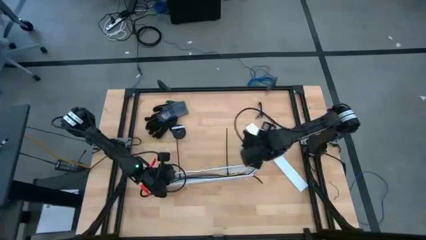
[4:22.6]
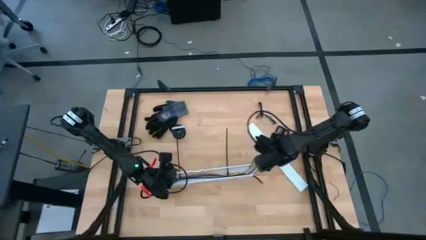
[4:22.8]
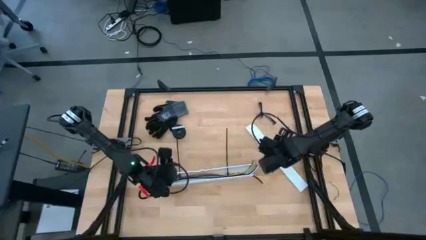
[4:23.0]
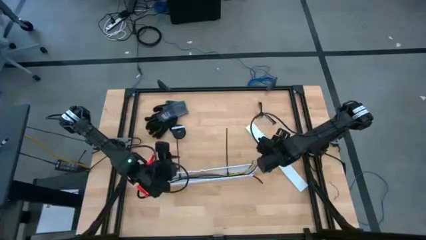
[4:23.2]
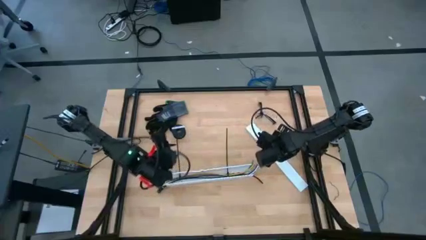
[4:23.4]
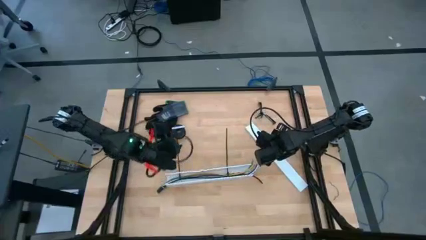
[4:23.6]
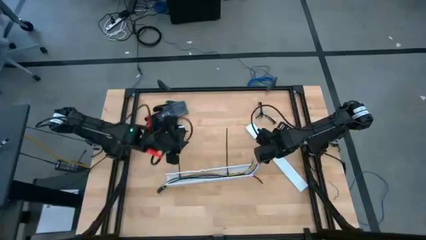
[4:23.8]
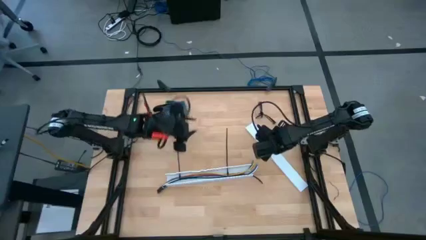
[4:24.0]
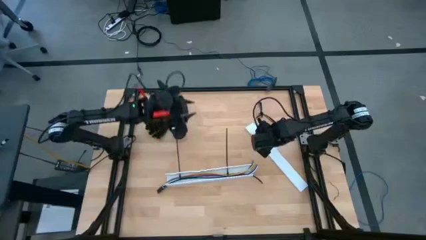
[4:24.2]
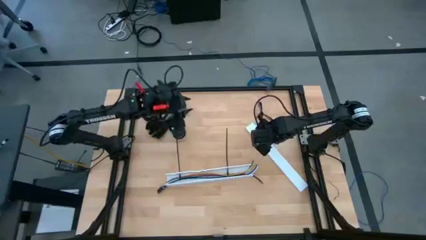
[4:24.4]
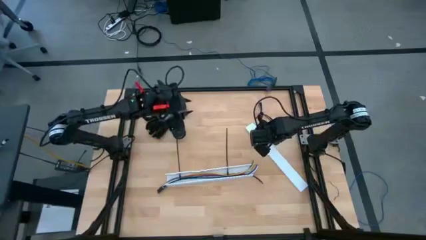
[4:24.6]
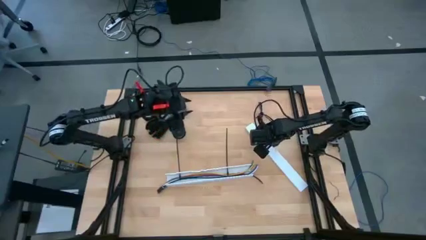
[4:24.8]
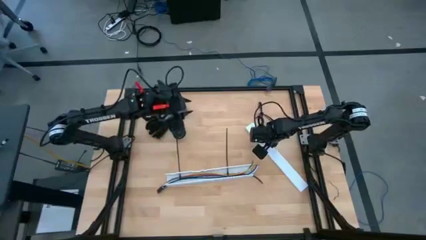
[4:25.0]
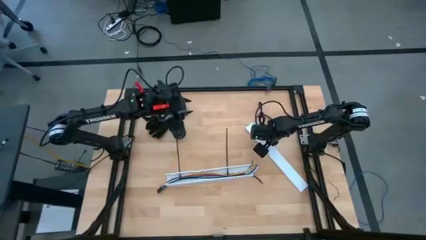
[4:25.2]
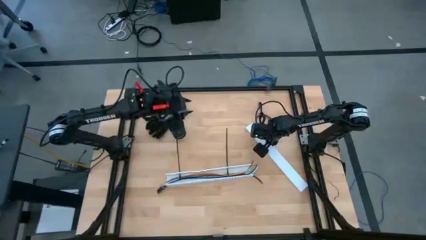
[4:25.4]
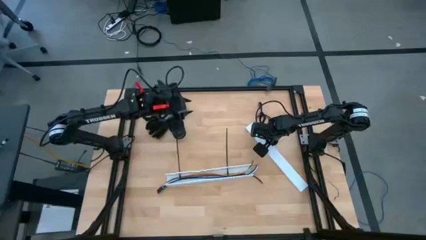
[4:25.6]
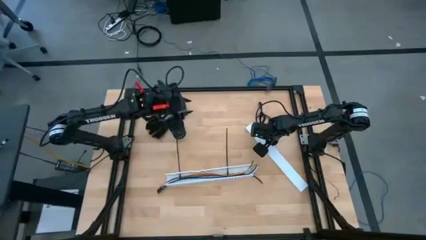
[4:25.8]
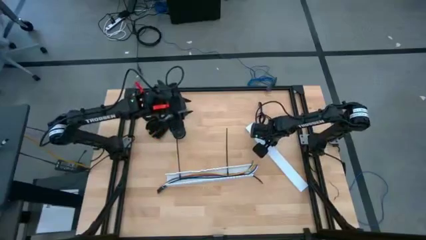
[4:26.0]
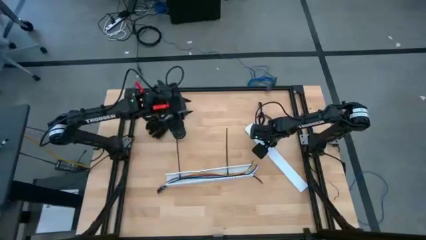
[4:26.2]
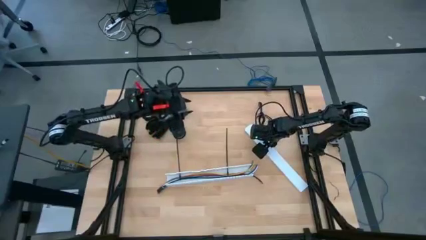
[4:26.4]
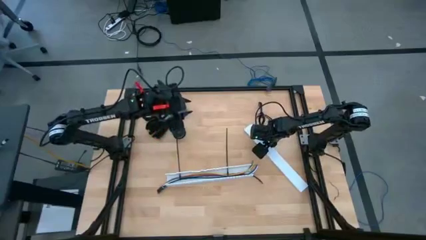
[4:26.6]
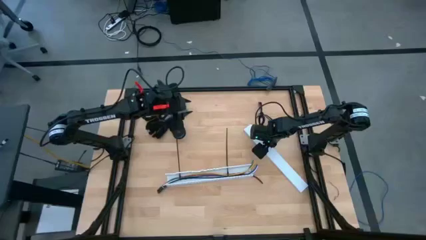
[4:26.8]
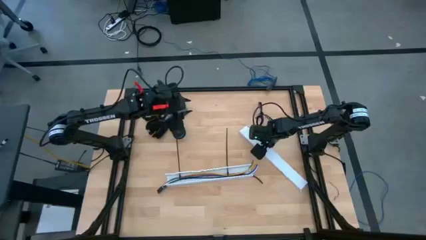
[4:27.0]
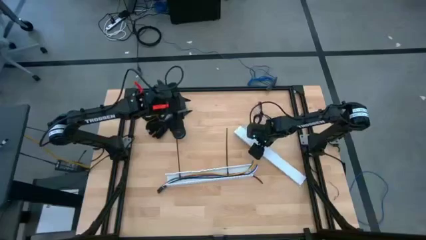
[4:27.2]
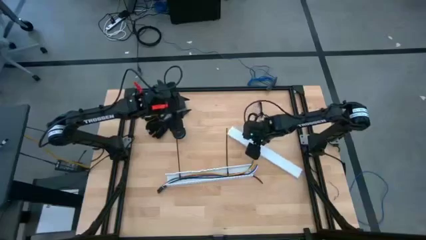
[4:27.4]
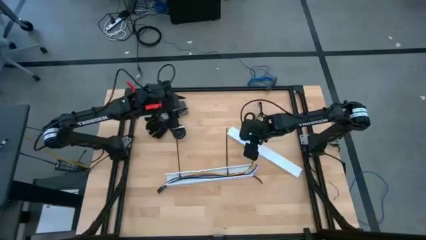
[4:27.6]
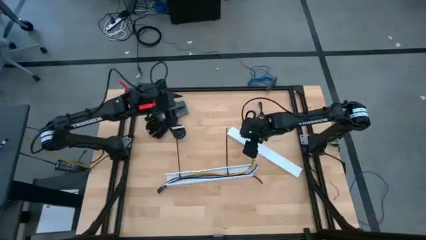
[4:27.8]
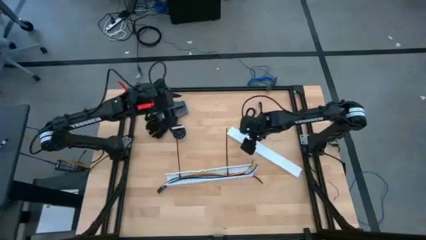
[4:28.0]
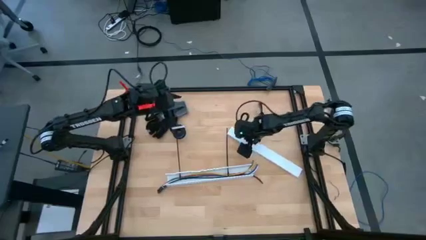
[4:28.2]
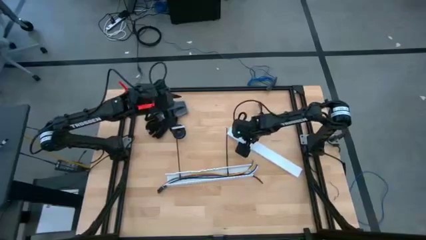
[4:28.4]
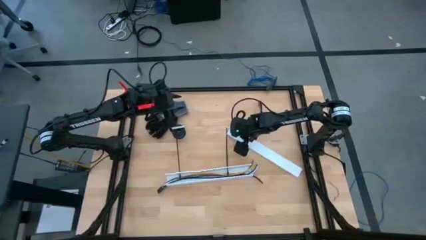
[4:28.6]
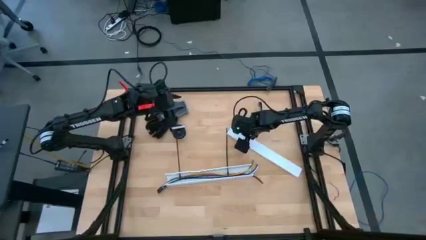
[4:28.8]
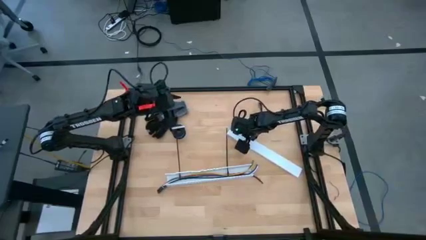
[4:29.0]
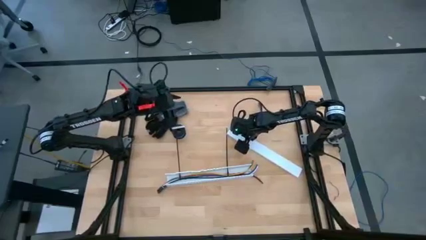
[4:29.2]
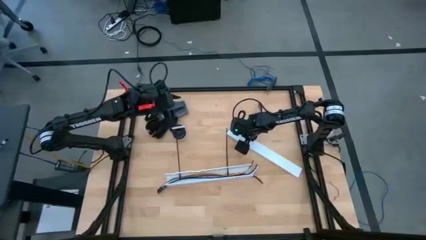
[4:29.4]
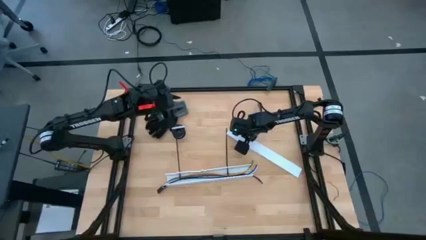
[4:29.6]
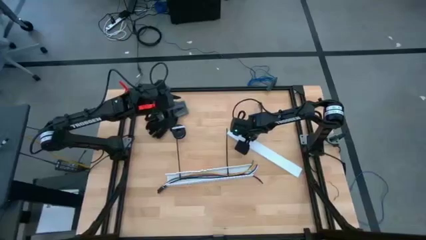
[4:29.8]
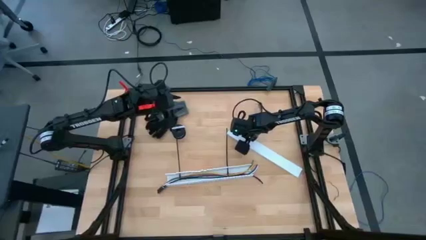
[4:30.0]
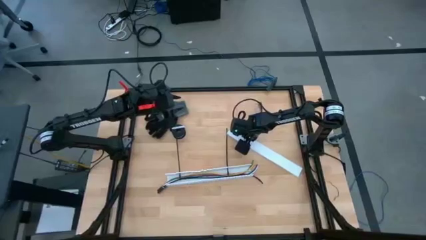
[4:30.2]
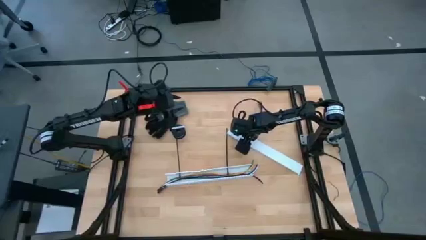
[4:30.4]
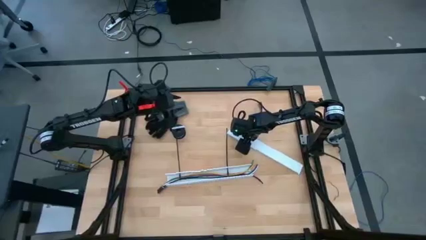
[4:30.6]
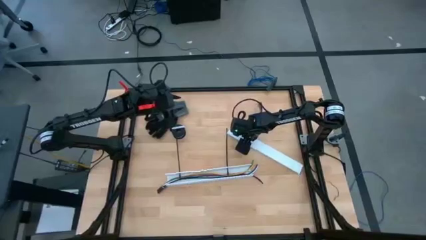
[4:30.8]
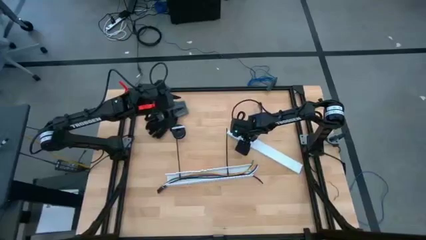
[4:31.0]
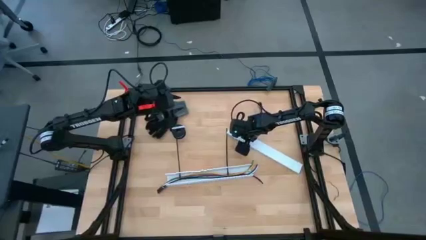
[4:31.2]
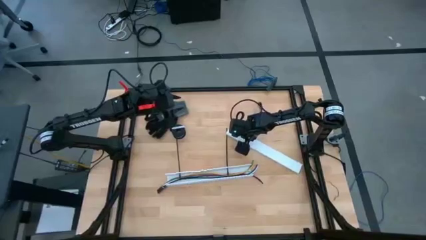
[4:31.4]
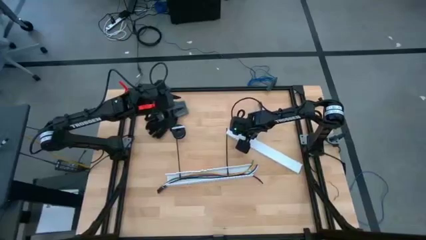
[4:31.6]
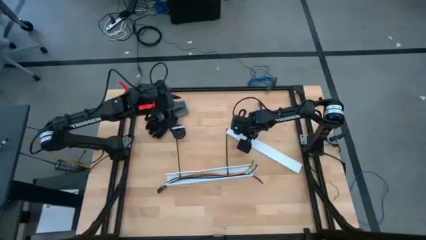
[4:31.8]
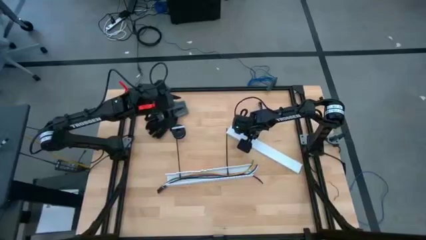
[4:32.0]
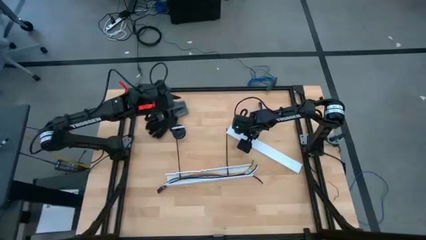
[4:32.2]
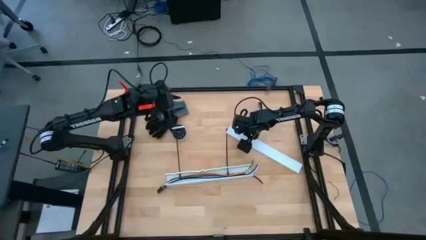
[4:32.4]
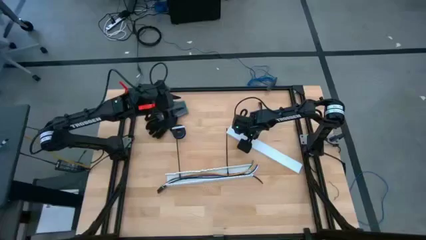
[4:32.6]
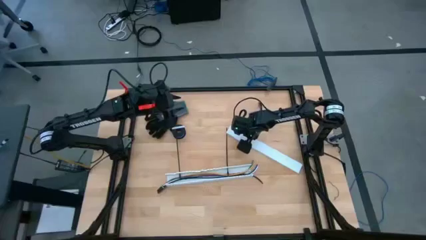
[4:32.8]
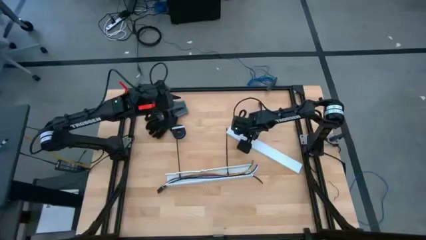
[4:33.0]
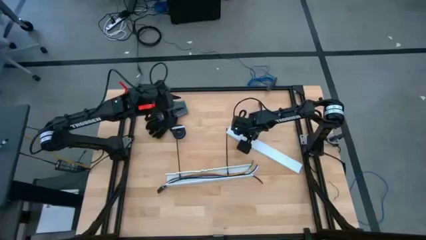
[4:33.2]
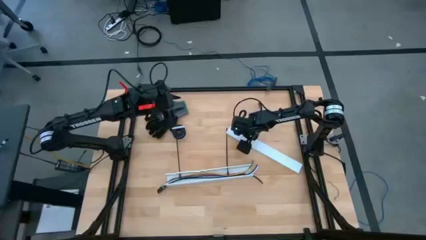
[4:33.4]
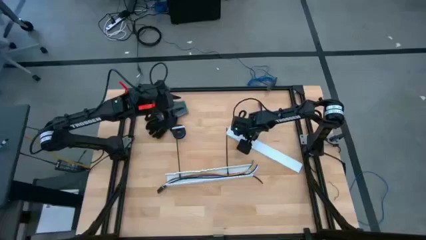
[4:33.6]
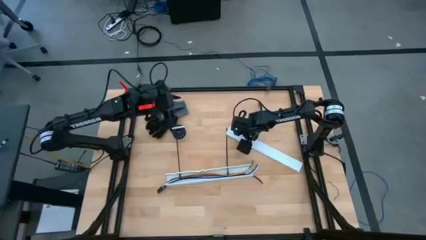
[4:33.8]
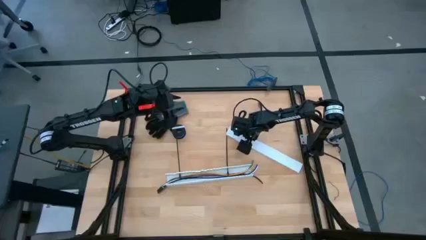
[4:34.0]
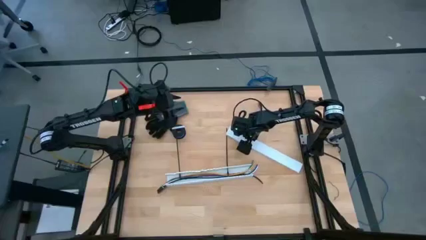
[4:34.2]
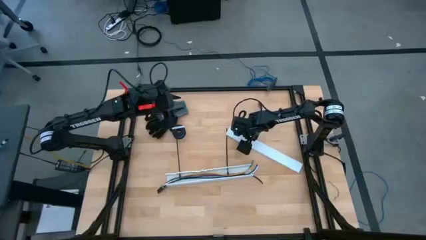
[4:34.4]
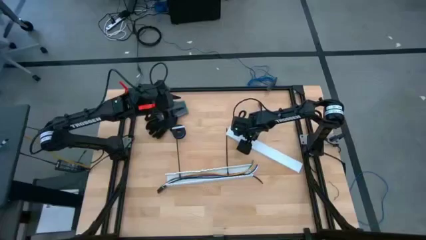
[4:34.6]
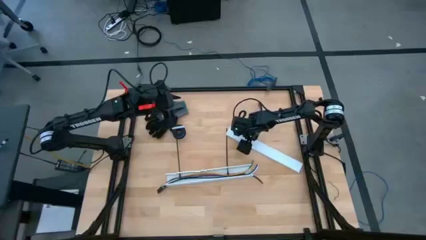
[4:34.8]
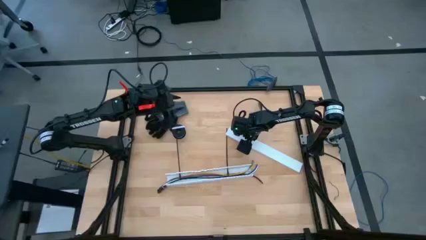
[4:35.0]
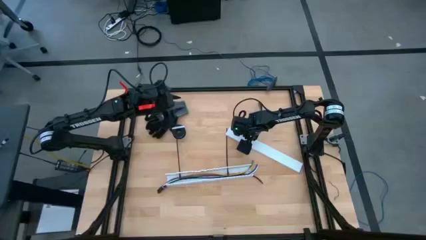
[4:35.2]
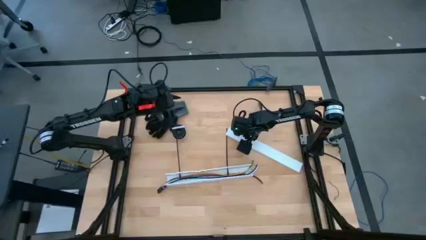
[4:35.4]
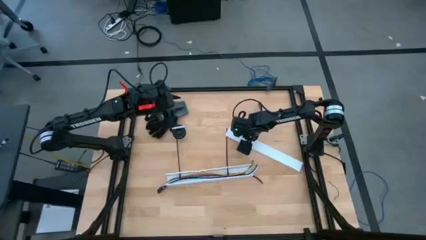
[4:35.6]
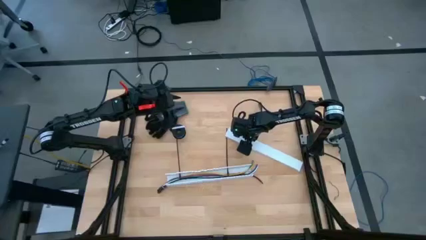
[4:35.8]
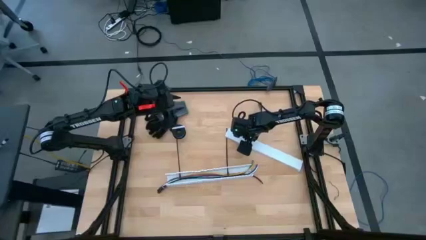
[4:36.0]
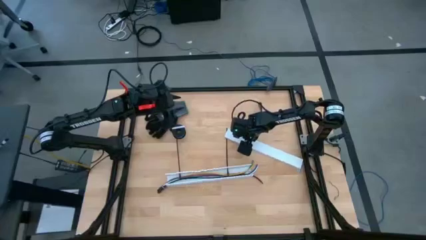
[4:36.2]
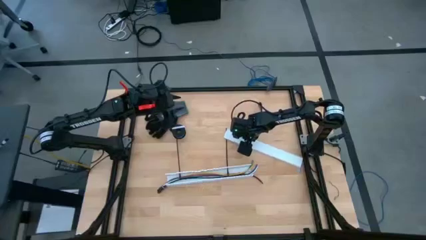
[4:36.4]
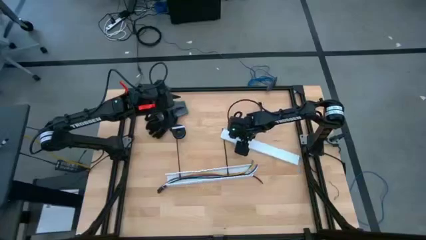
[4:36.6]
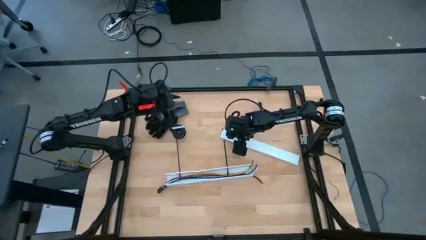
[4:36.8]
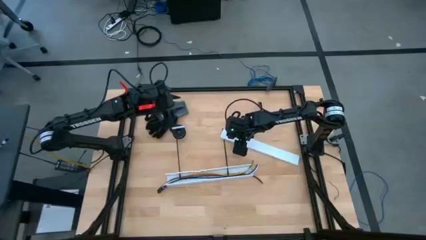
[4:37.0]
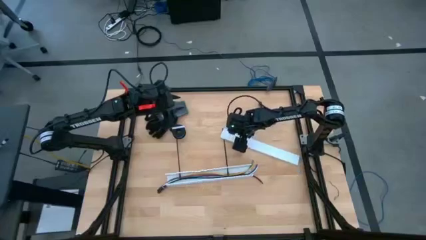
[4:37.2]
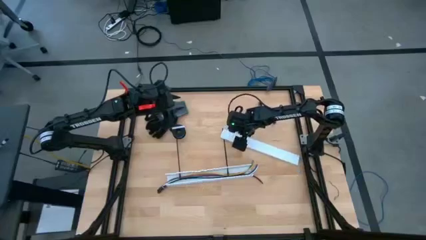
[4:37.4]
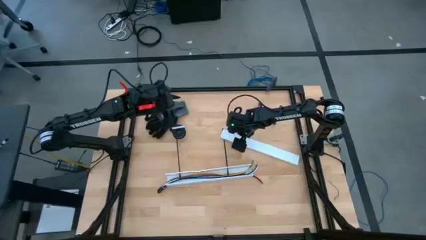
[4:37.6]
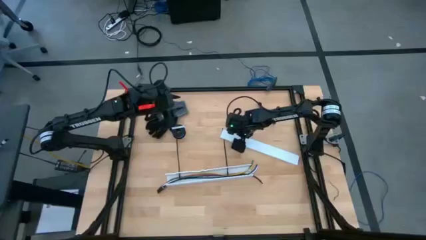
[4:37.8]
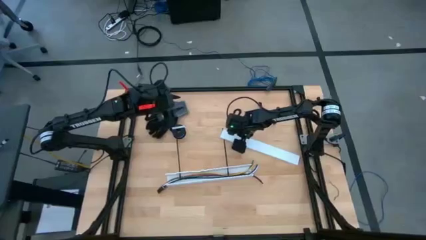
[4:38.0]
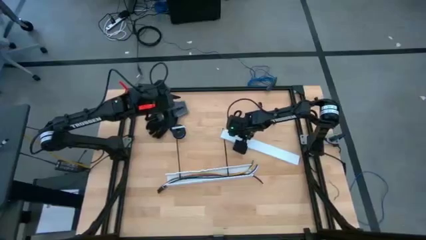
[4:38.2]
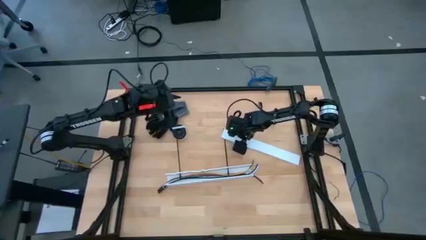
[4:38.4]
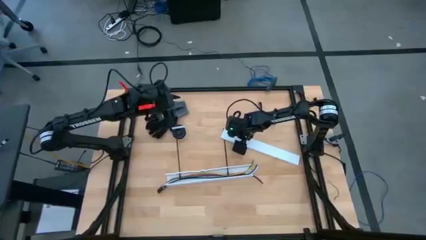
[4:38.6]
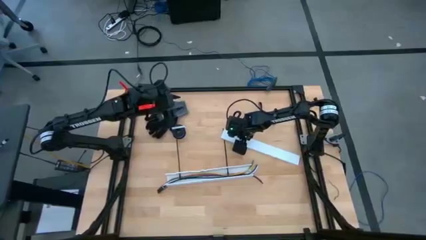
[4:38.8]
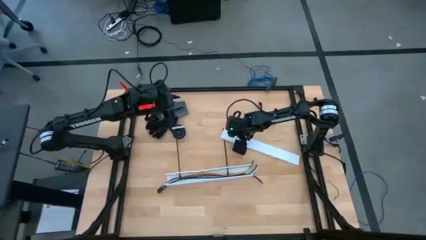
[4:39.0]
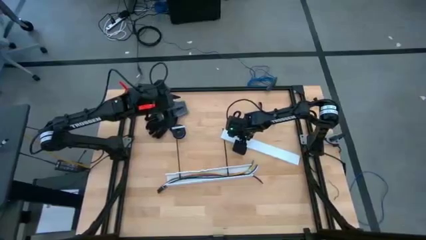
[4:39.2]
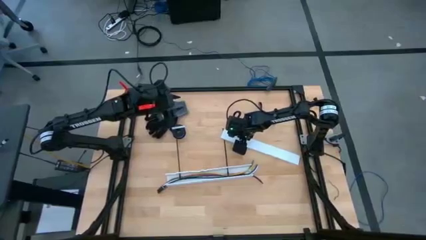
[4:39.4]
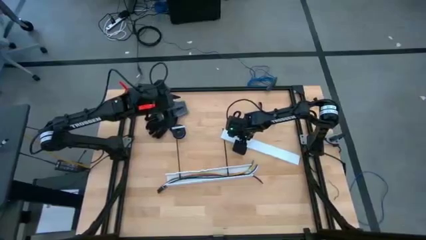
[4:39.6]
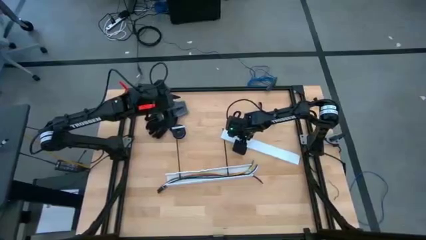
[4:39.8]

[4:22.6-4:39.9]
Task: Ziptie cables
Close the white cable duct cover
